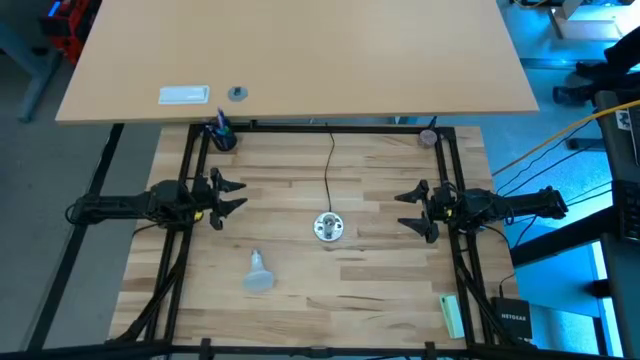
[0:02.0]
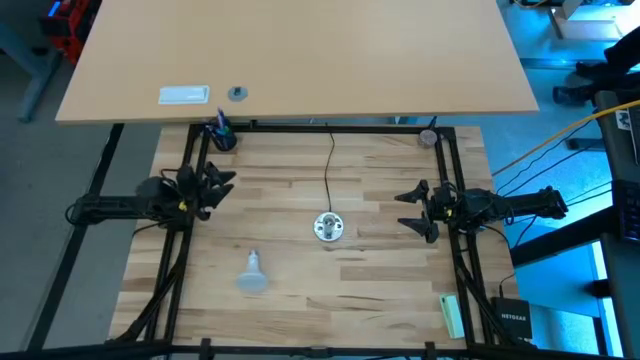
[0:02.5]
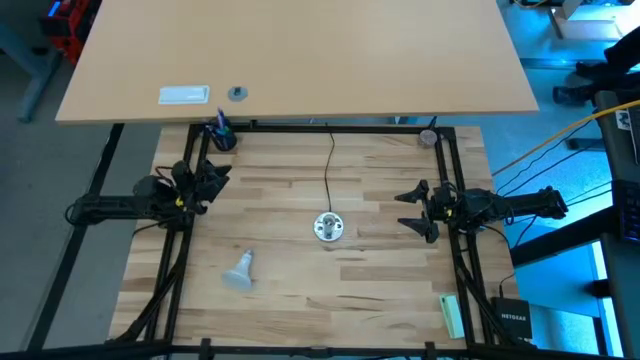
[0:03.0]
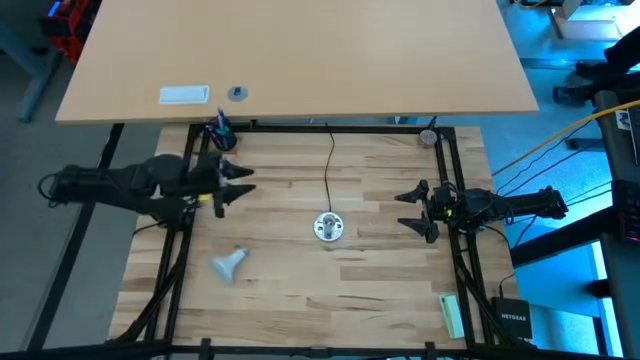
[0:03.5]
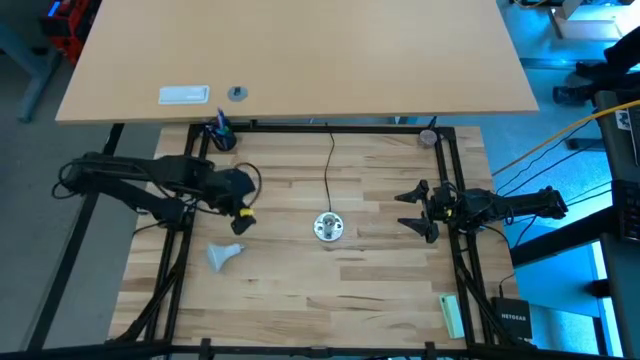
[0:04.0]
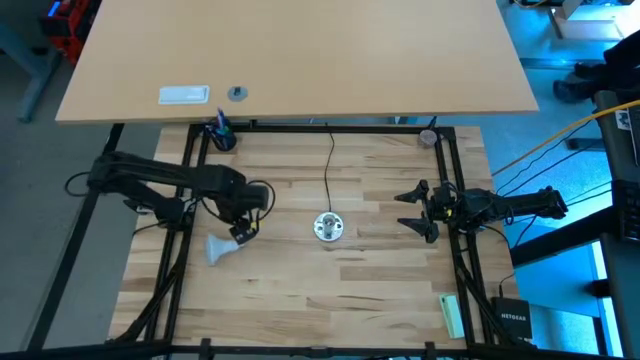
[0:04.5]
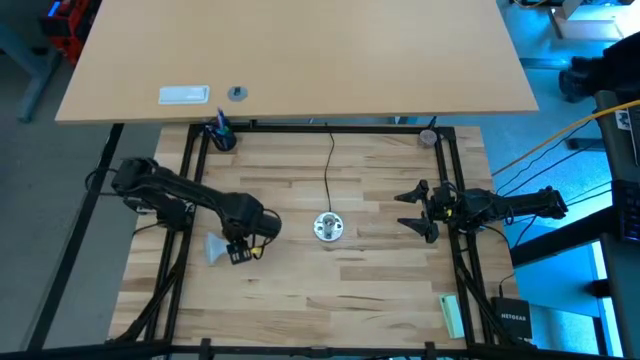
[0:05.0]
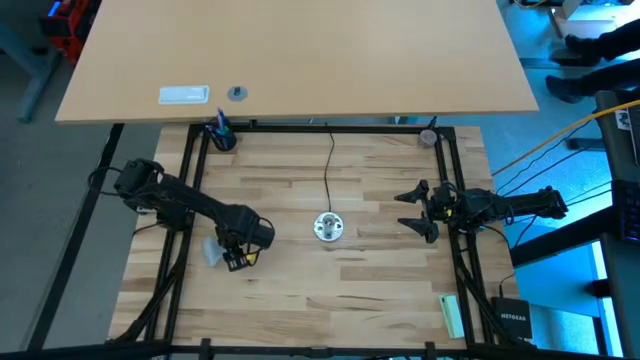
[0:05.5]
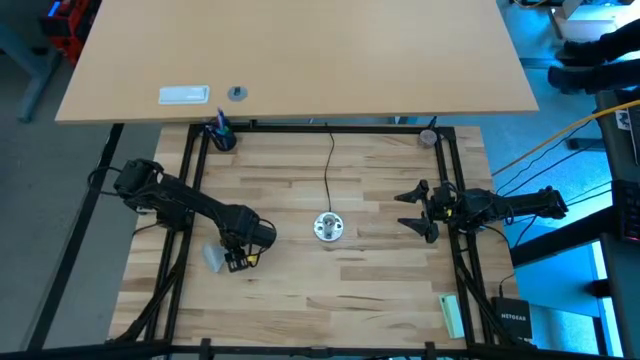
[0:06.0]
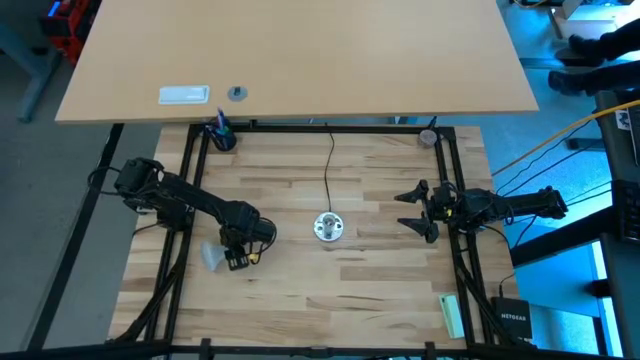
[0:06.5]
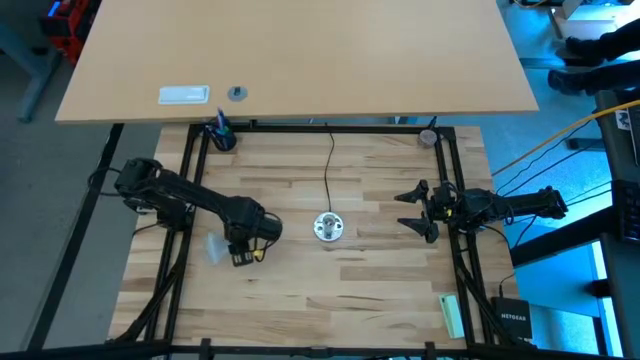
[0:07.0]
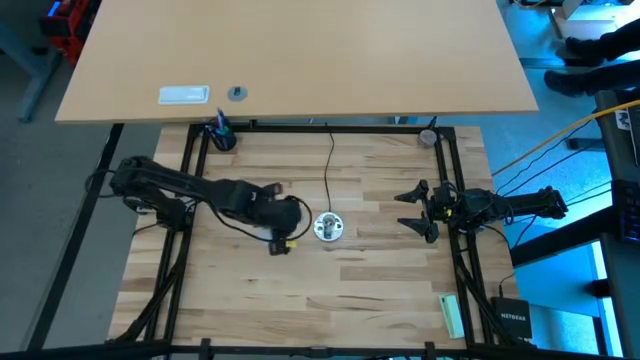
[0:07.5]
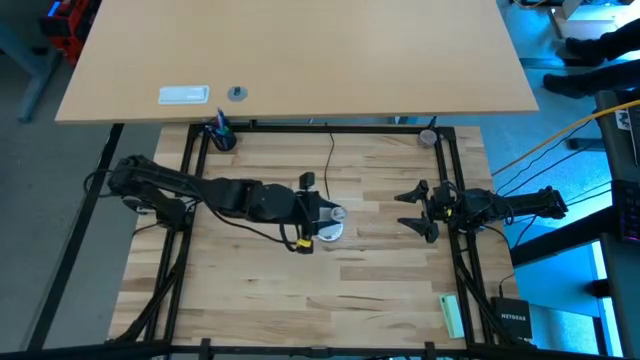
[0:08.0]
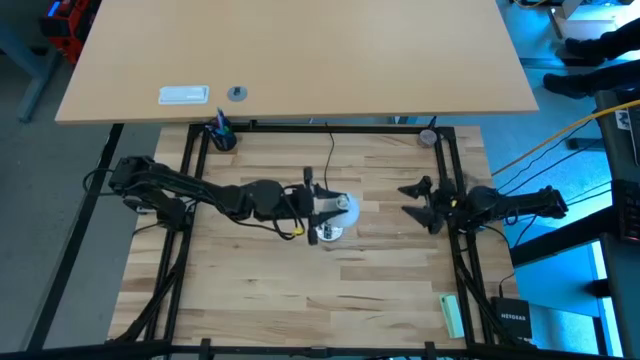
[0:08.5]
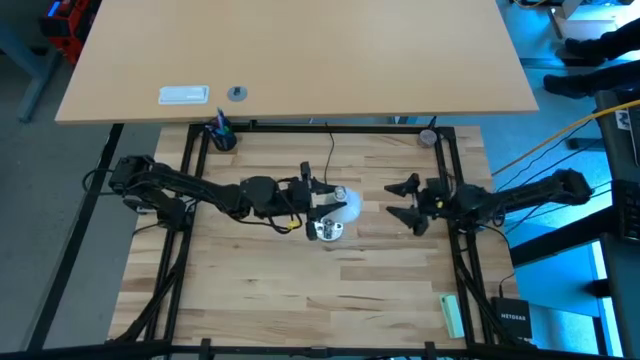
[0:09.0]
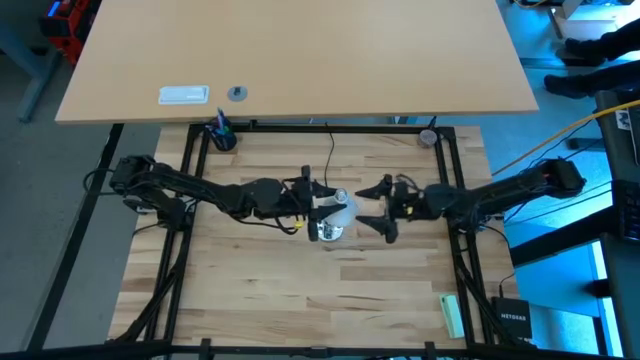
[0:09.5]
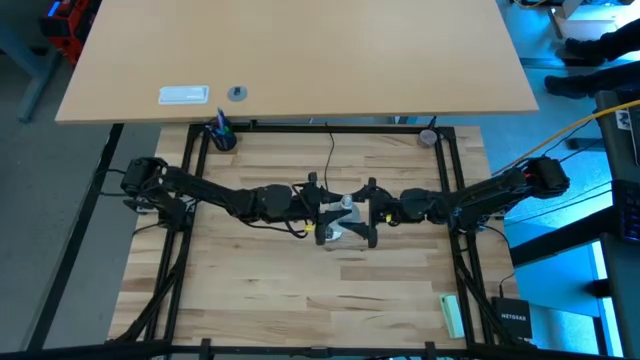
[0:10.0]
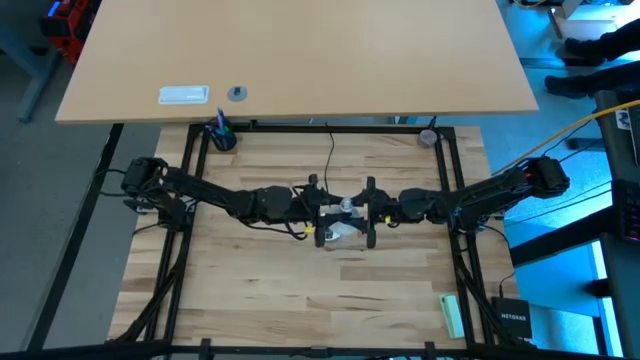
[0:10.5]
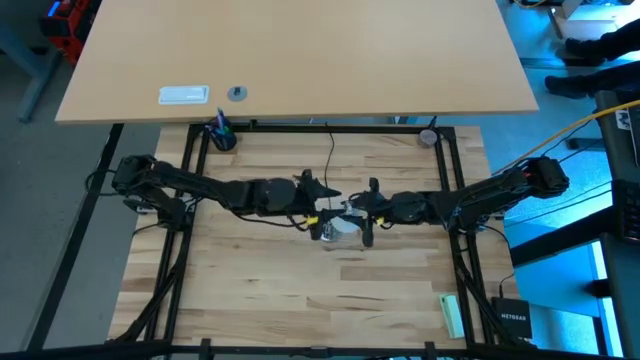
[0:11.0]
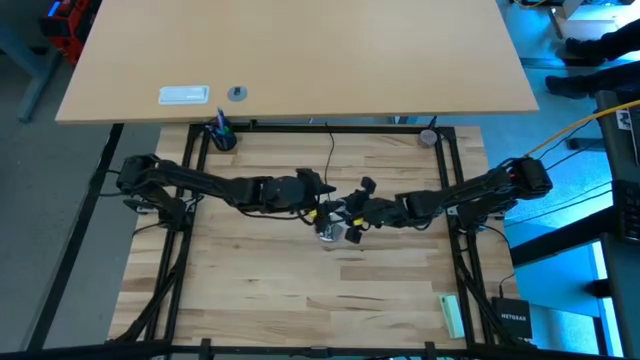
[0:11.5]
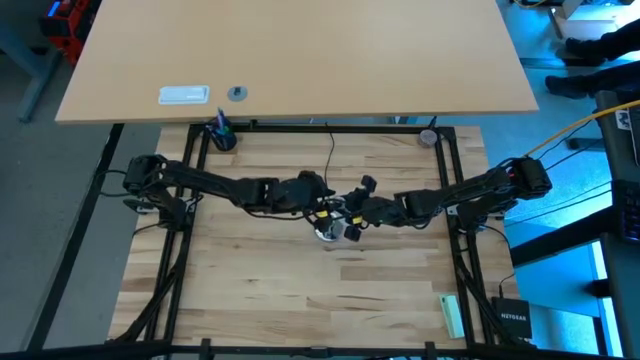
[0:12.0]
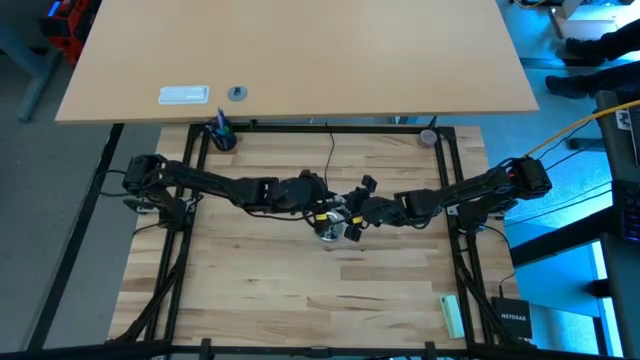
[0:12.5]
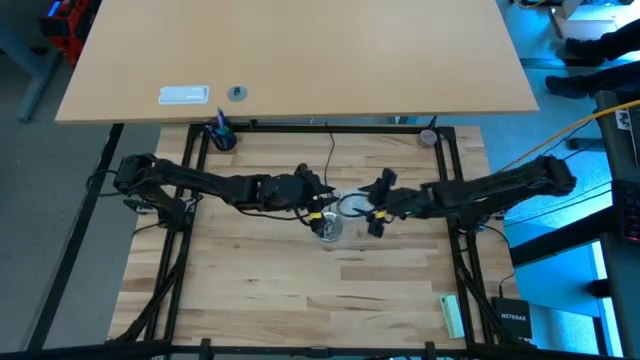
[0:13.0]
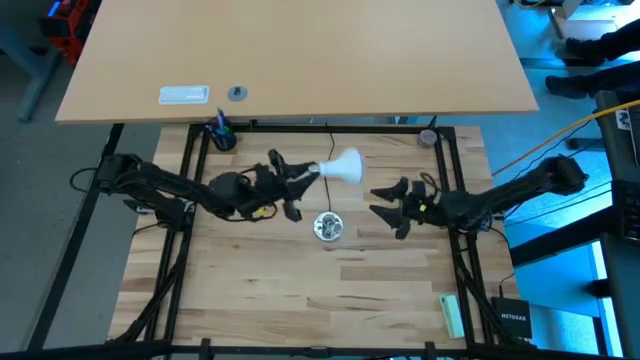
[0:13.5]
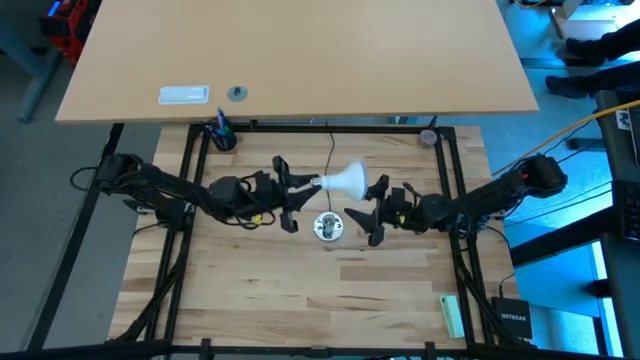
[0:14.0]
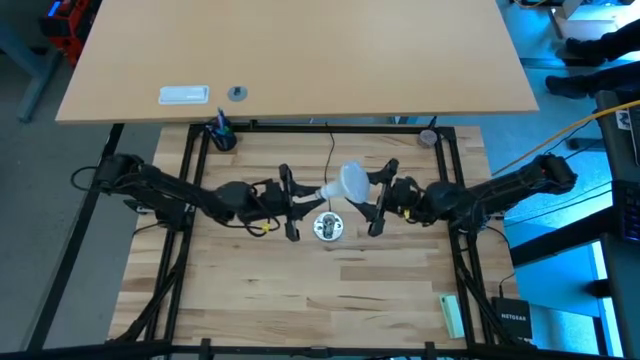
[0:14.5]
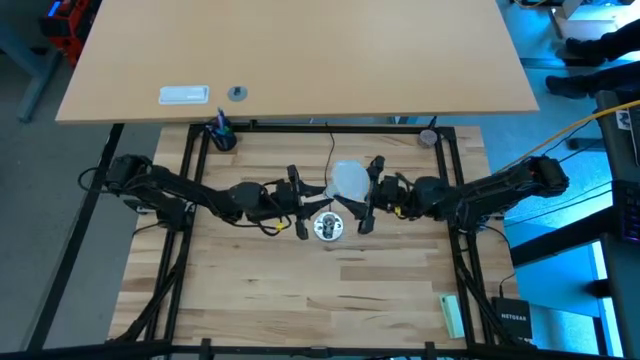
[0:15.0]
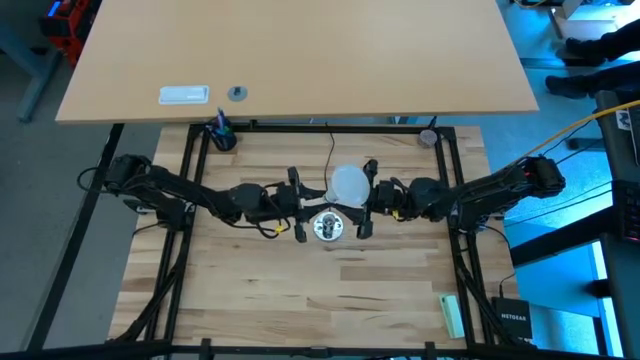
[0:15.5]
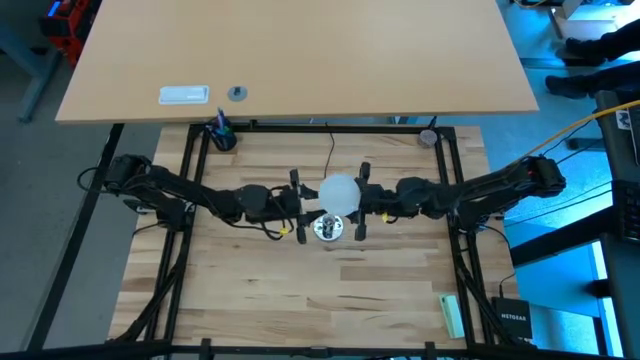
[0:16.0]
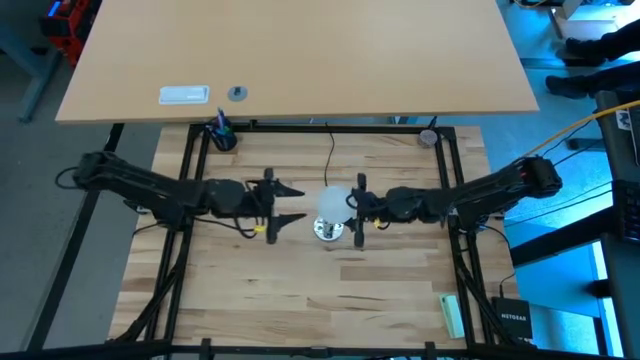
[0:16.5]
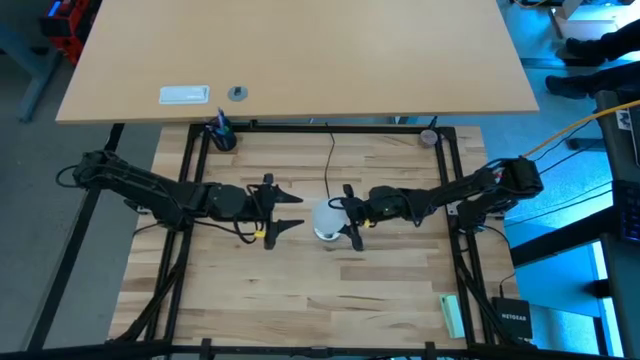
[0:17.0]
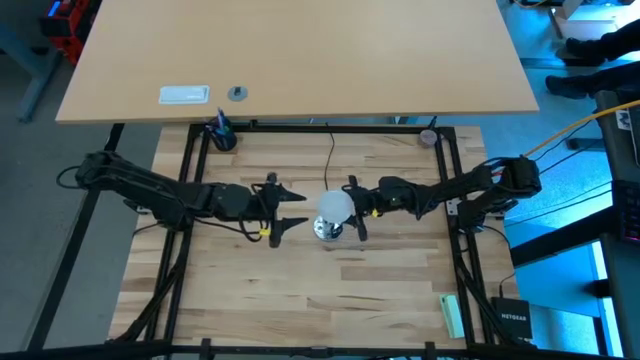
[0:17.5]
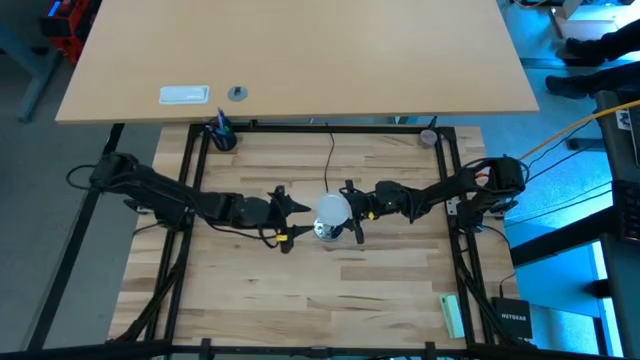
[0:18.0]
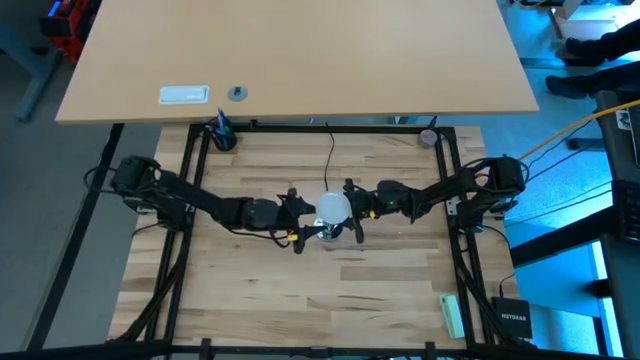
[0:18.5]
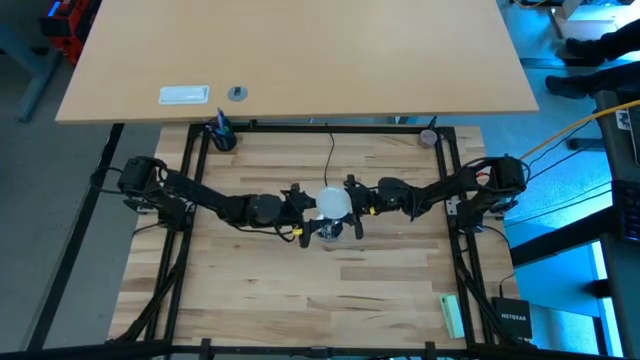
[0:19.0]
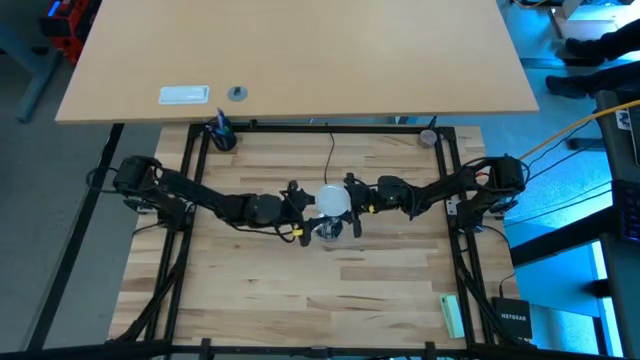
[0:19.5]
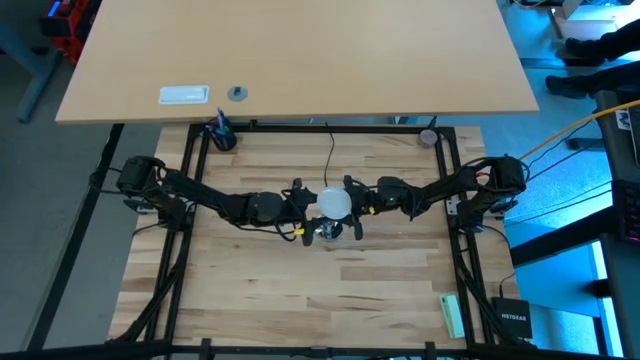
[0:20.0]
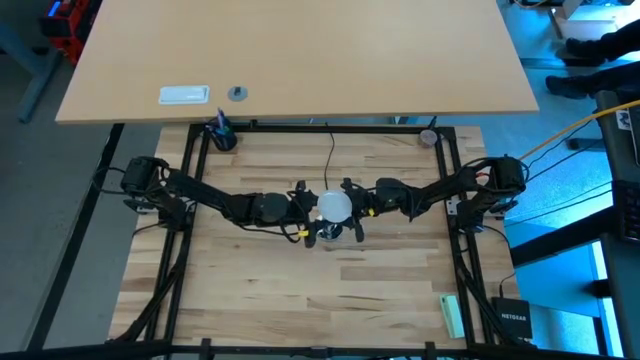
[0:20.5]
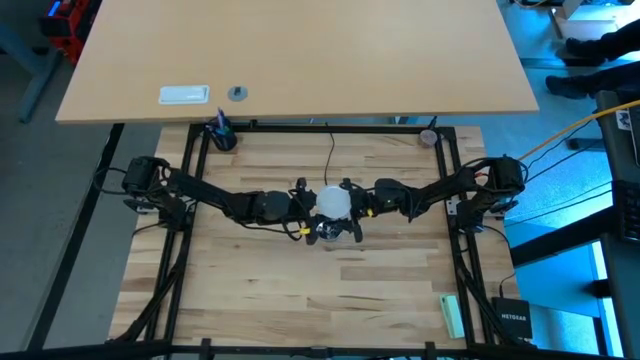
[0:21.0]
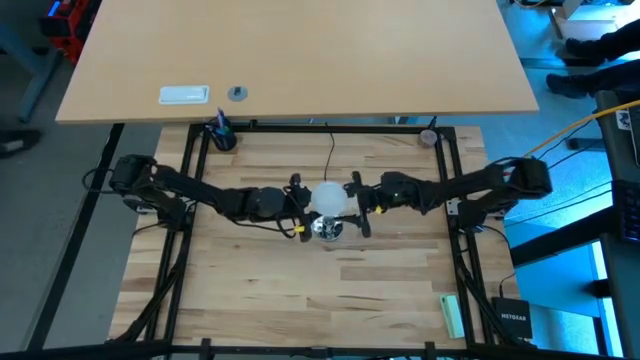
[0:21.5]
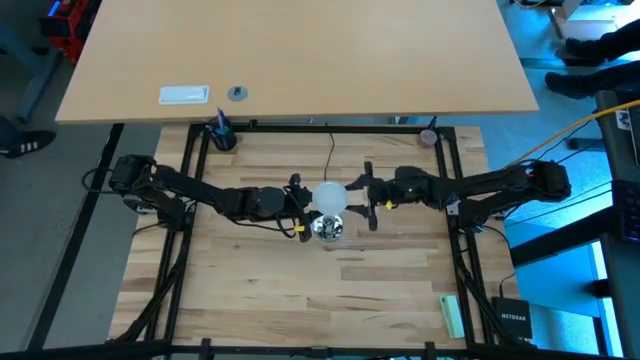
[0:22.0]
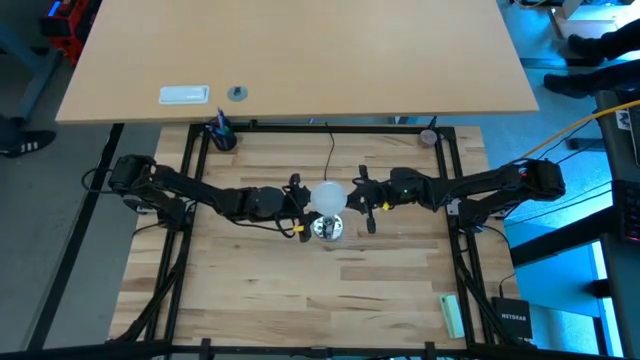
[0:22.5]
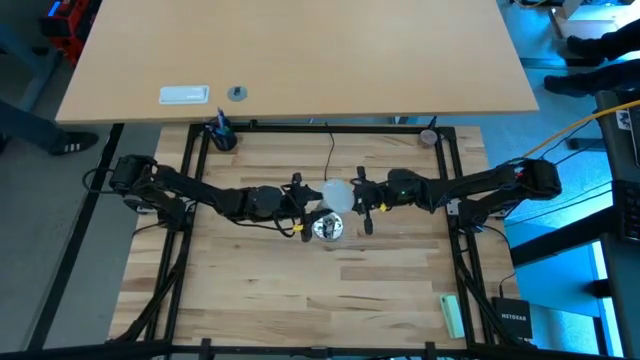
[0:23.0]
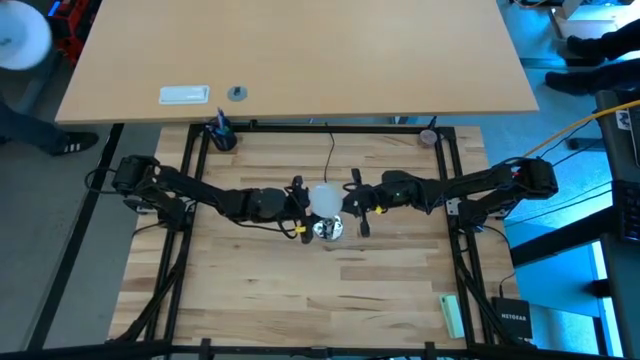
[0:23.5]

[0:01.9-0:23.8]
Task: Screw lightbulb
Insert the lightbulb on the lamp
